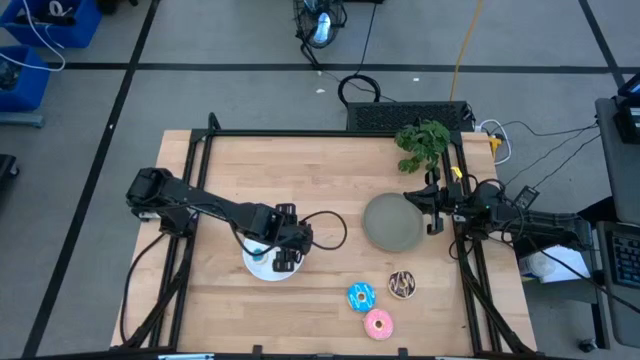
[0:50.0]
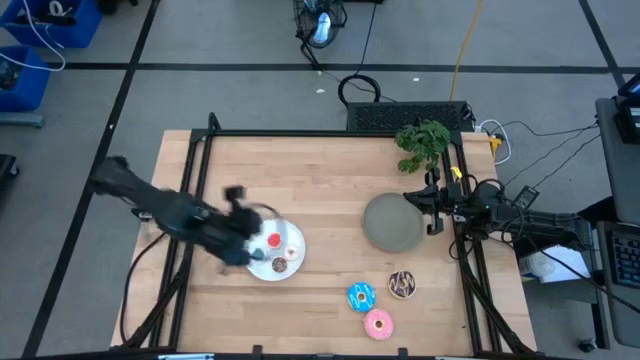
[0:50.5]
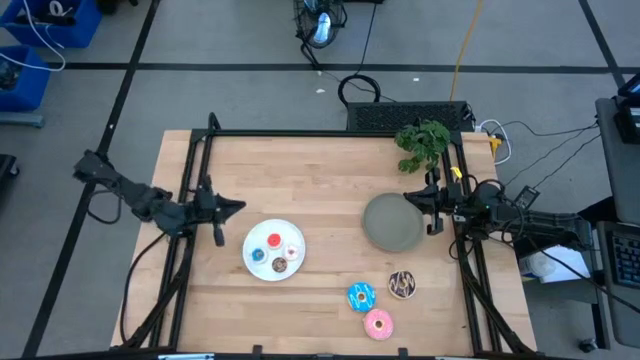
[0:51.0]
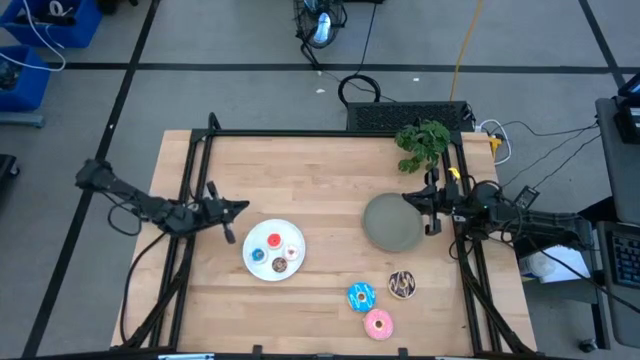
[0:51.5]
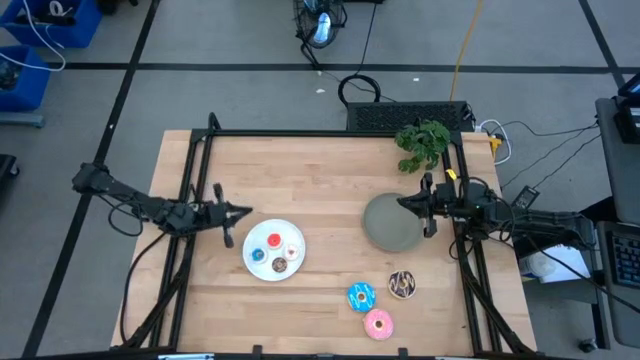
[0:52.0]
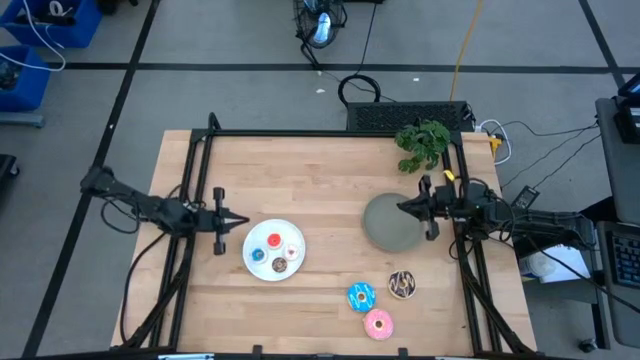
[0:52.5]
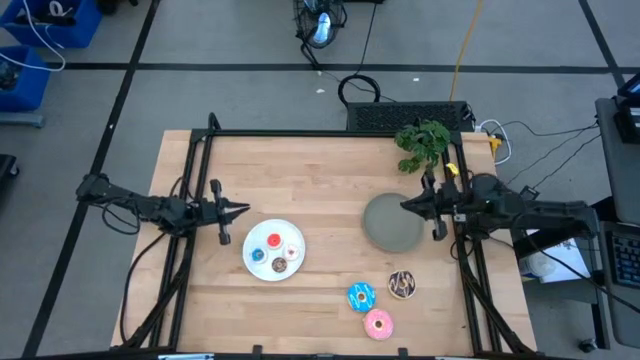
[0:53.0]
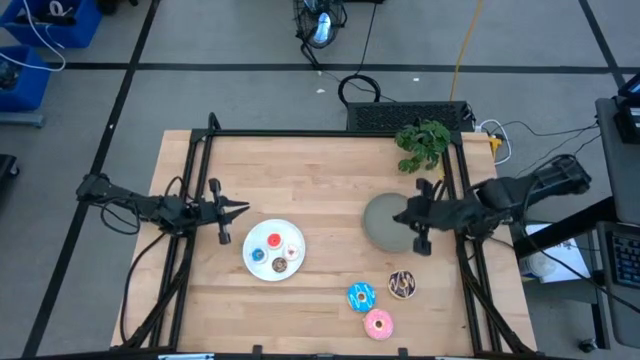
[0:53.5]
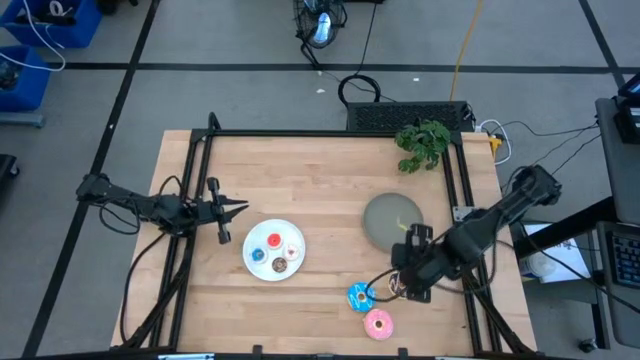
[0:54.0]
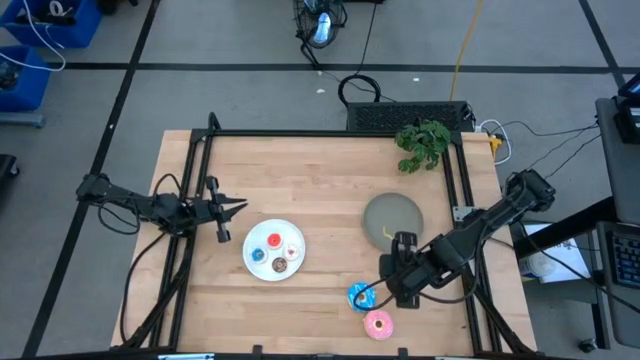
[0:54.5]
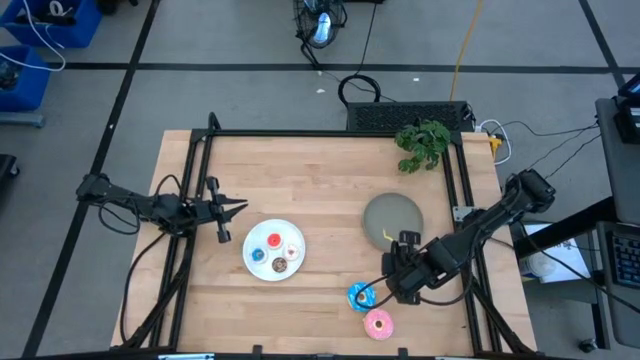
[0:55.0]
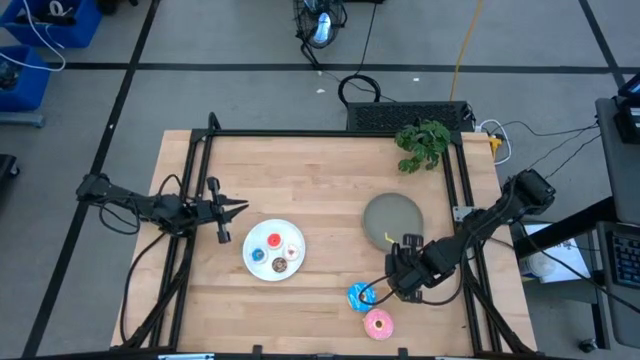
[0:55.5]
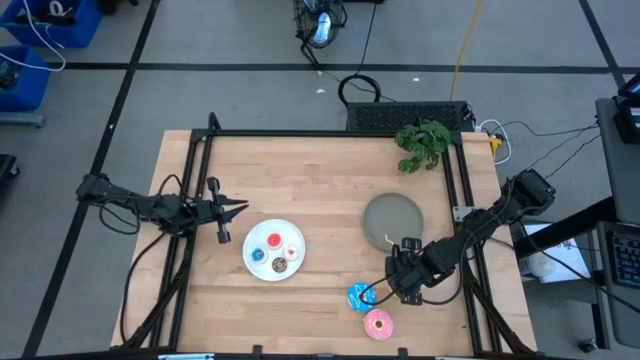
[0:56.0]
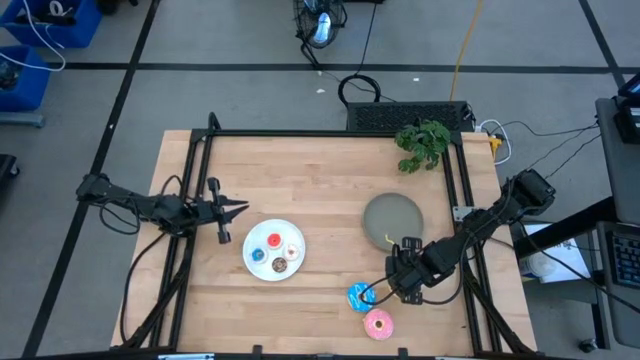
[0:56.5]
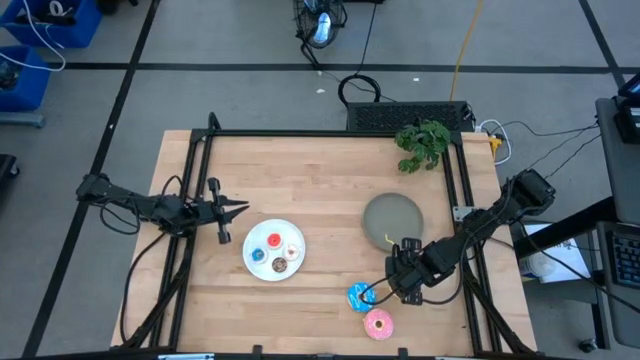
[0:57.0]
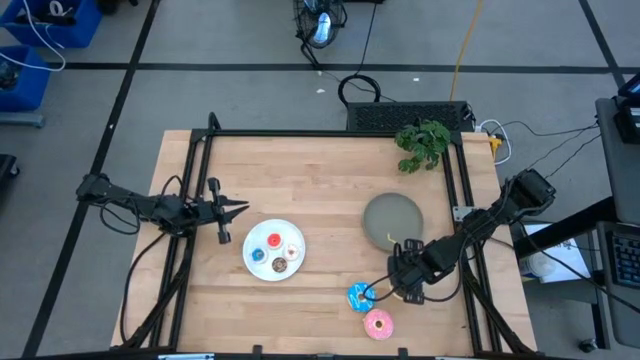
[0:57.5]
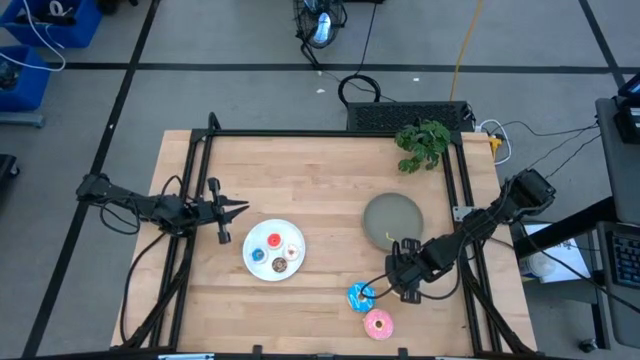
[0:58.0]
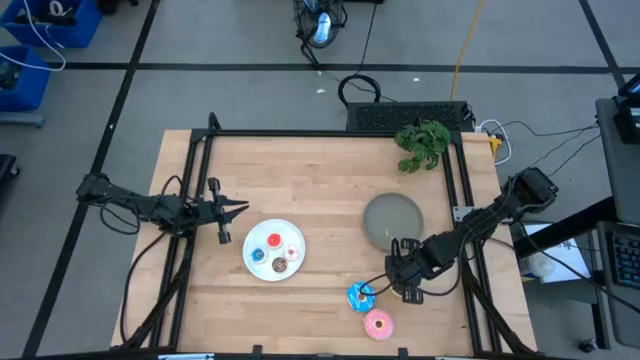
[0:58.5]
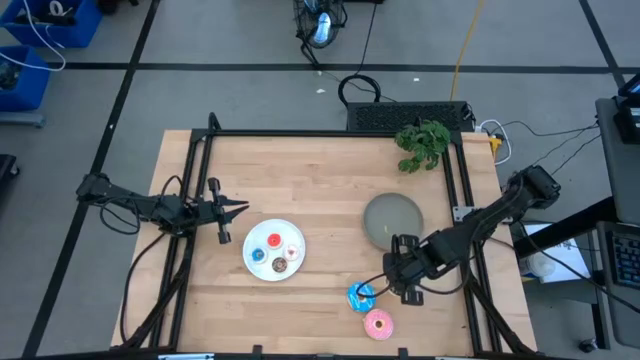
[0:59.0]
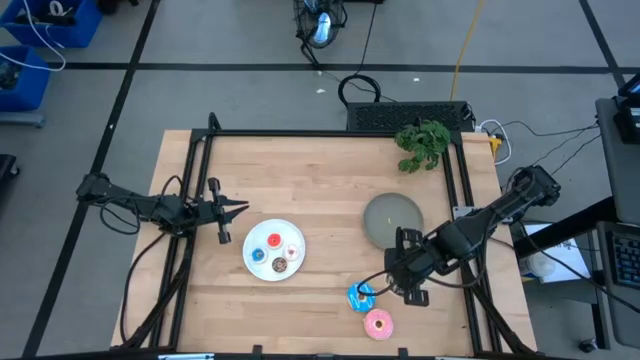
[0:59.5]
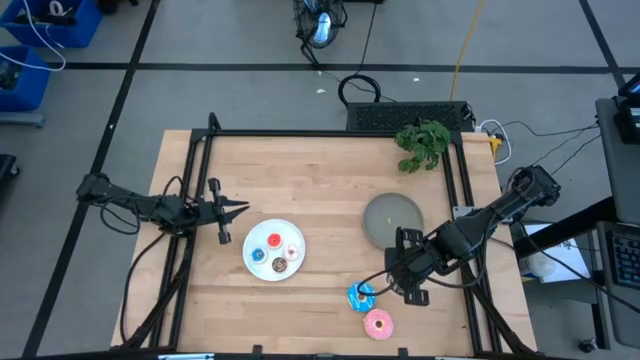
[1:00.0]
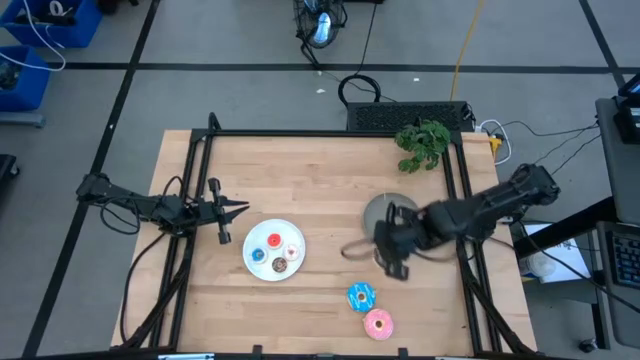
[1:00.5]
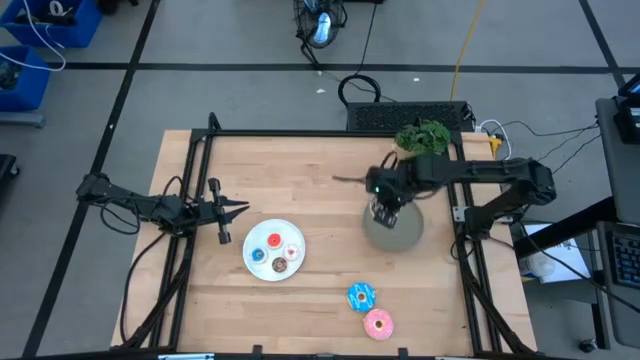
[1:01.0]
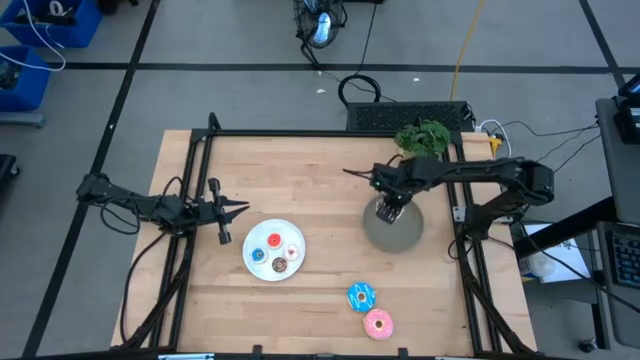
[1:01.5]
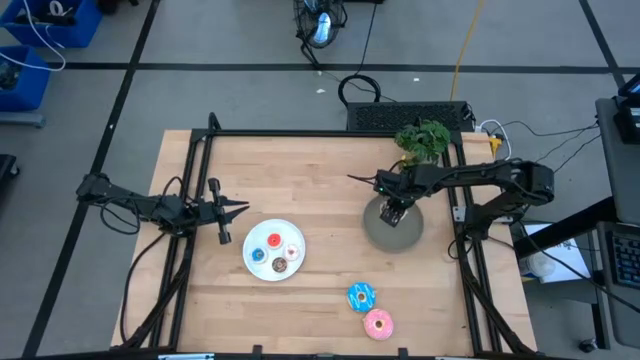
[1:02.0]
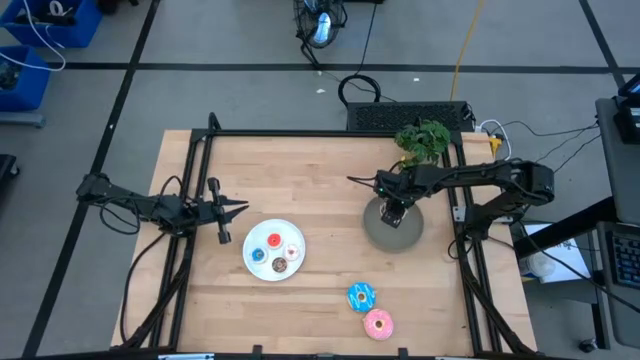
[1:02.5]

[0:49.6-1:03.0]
Task: Pick & Place donuts
Put the big black donut on the gray plate

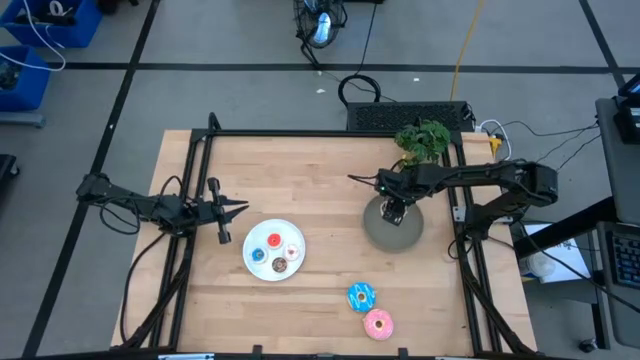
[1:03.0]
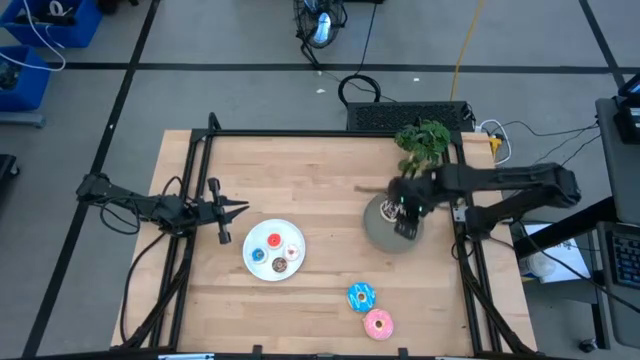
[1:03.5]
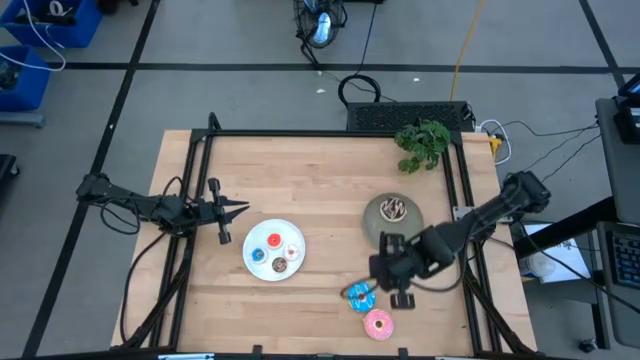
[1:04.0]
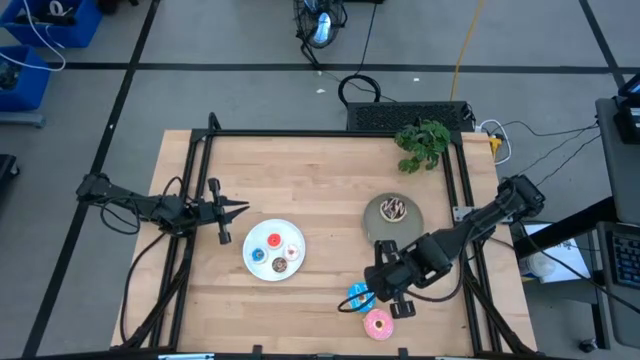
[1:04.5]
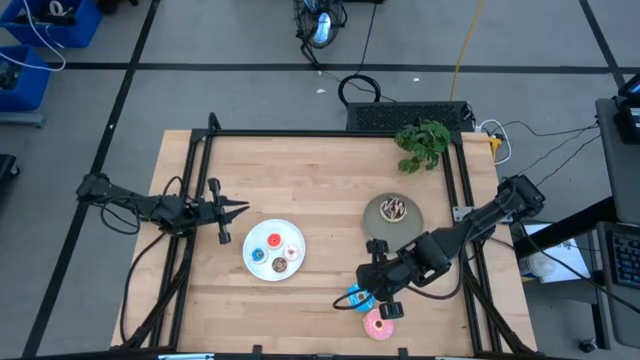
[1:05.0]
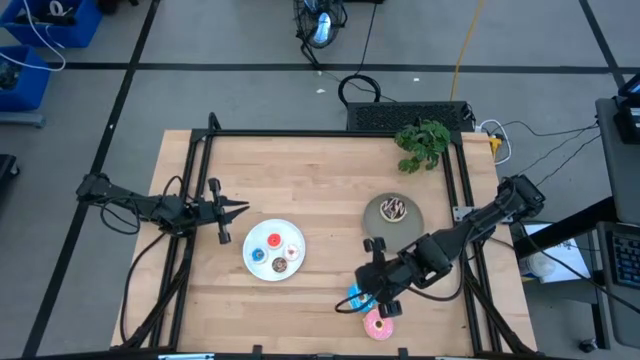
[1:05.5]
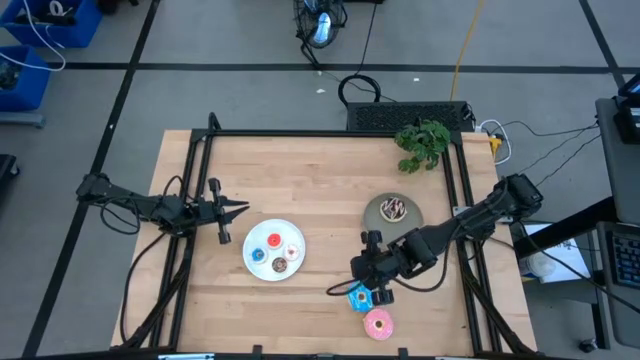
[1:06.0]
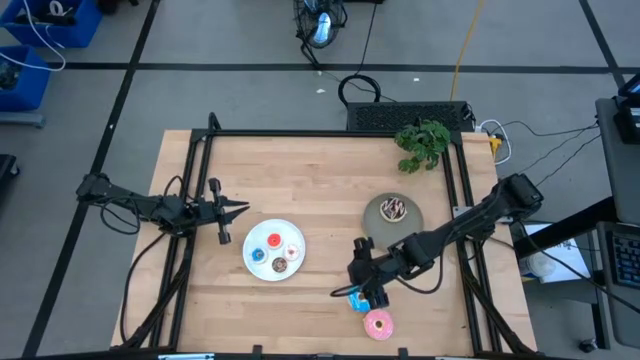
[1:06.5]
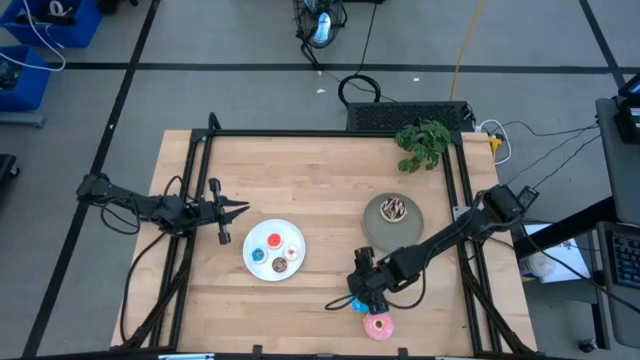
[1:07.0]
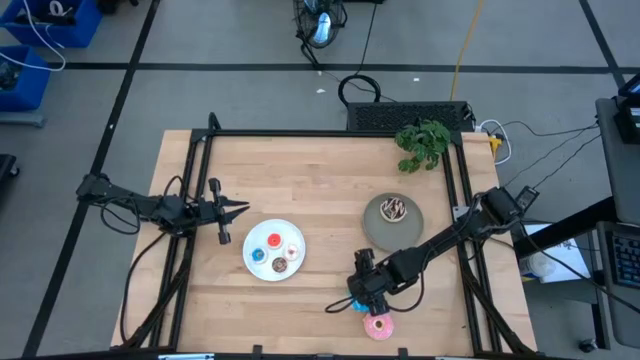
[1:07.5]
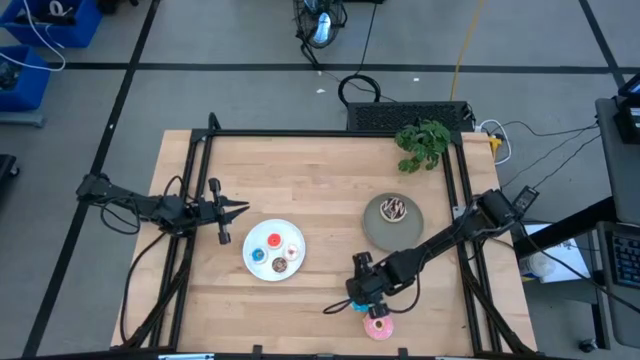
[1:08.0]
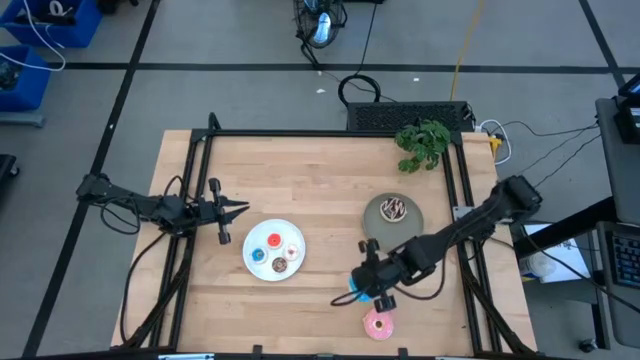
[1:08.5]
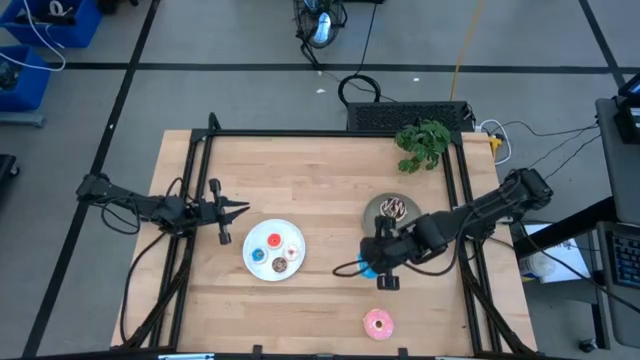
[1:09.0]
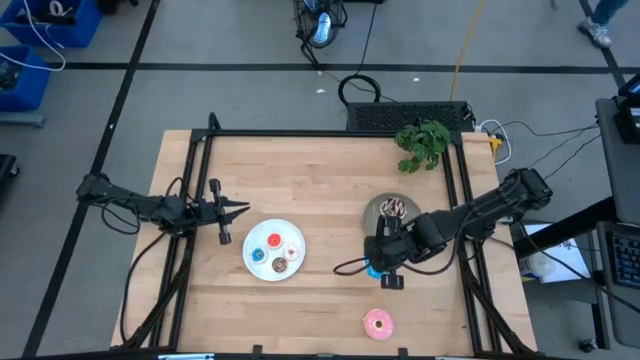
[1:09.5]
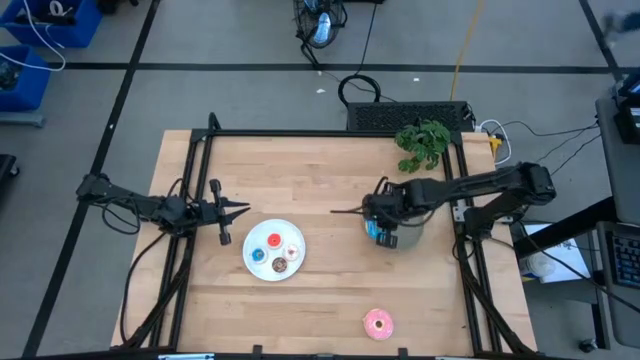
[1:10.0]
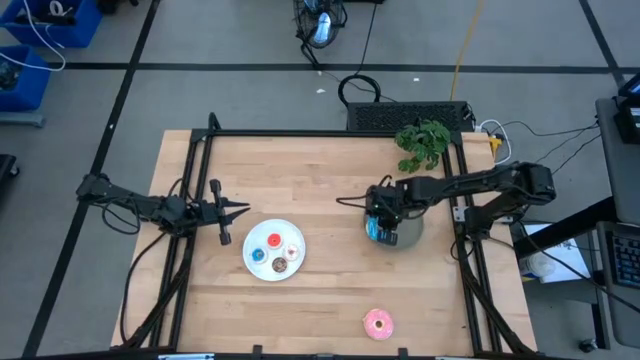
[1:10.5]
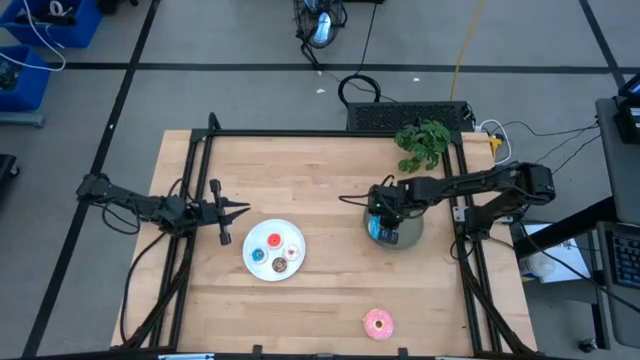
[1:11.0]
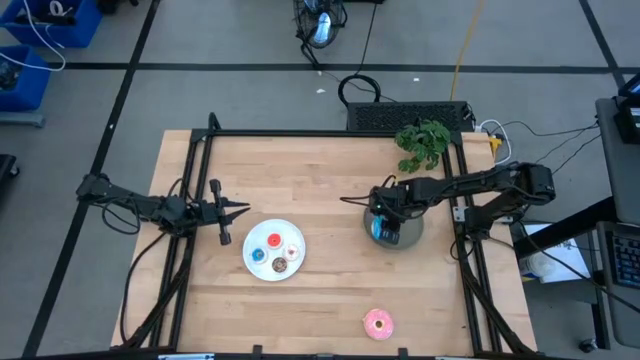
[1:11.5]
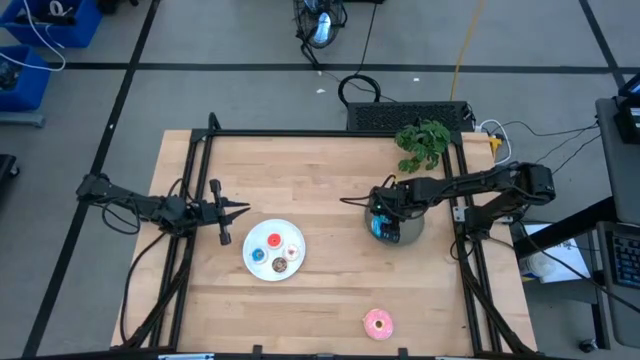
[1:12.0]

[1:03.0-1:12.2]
Put the big blue donut on the gray plate
